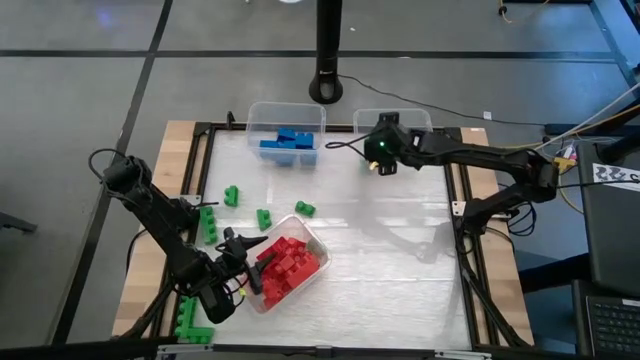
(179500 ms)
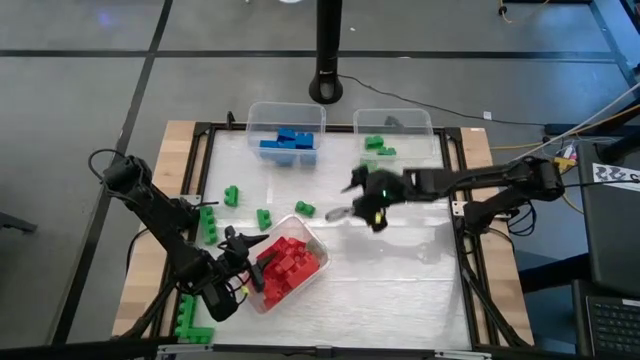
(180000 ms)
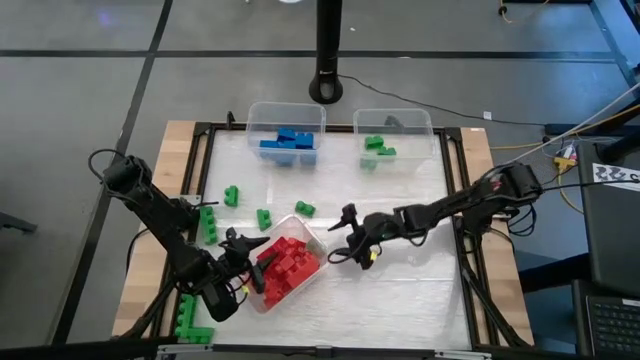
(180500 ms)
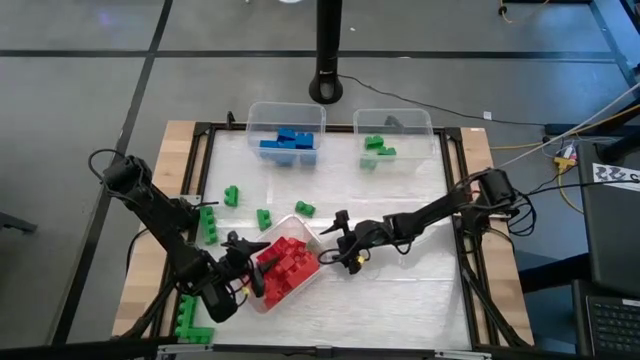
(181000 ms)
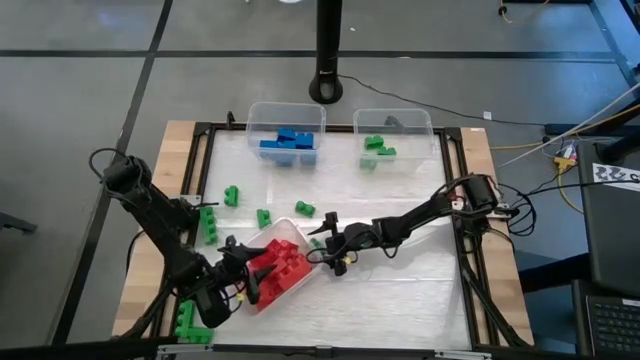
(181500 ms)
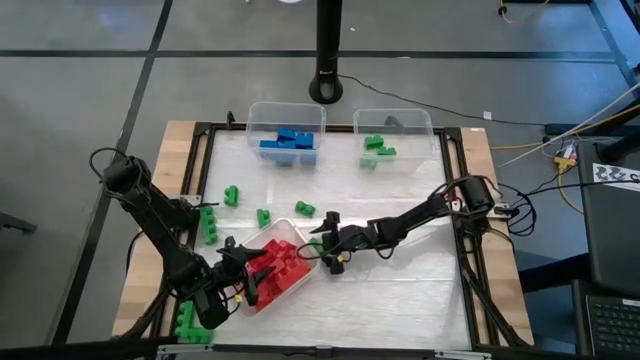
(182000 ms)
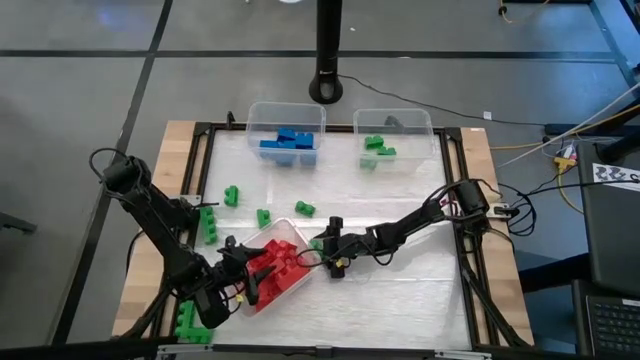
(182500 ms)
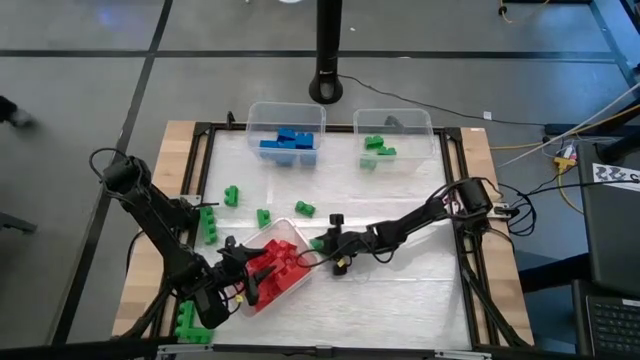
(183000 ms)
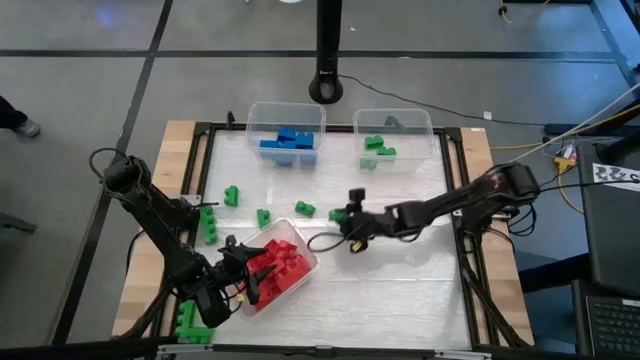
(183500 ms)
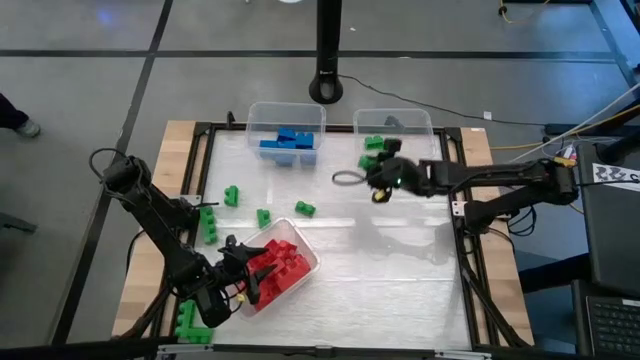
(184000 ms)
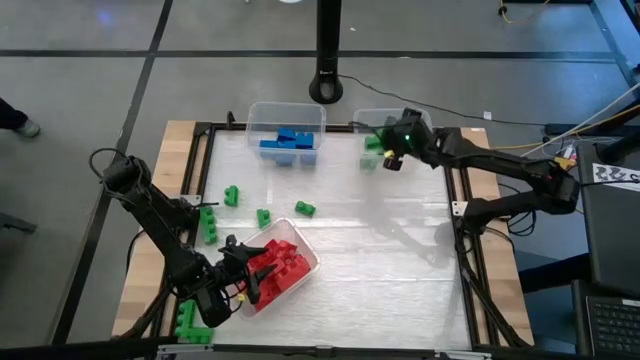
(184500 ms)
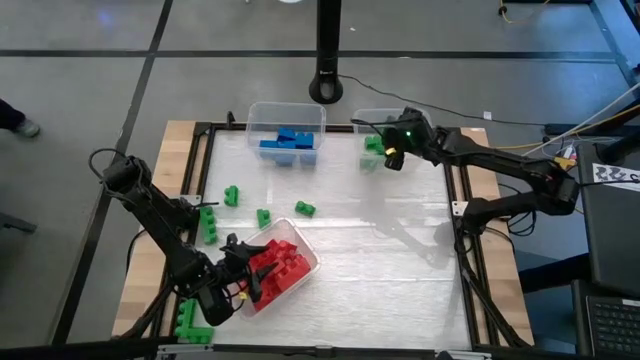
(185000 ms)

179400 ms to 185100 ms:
Task: Sort blocks
Put the green game piece into the top right transparent bin

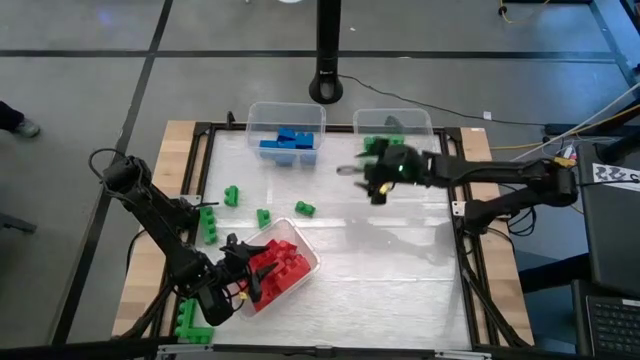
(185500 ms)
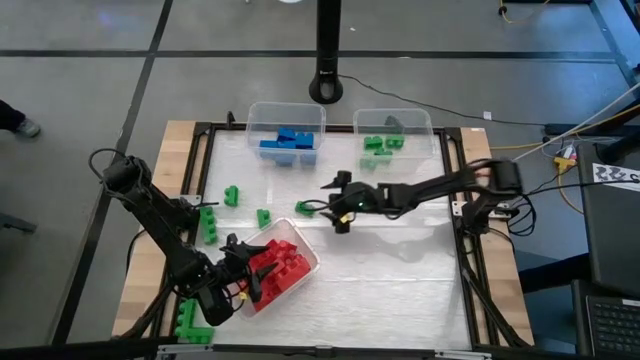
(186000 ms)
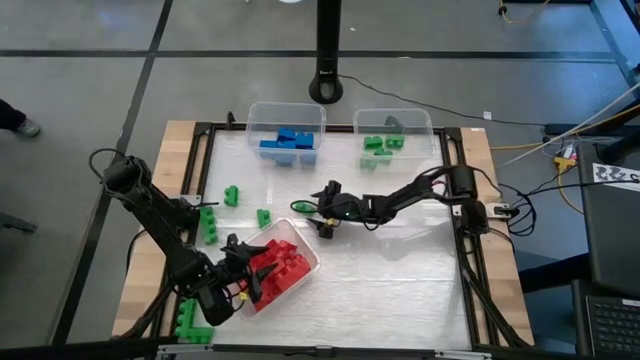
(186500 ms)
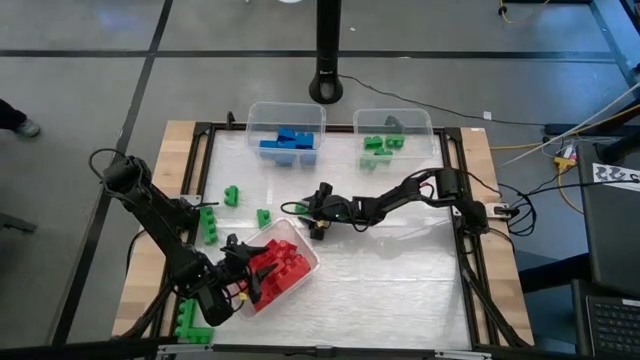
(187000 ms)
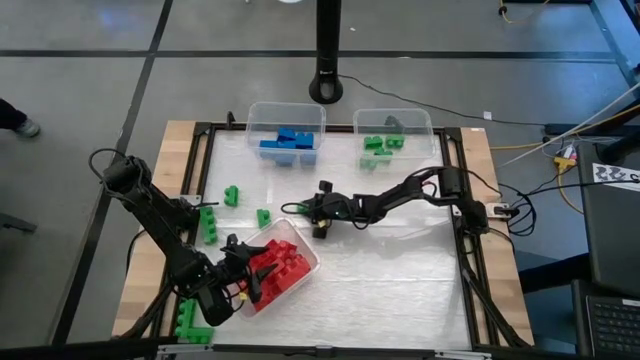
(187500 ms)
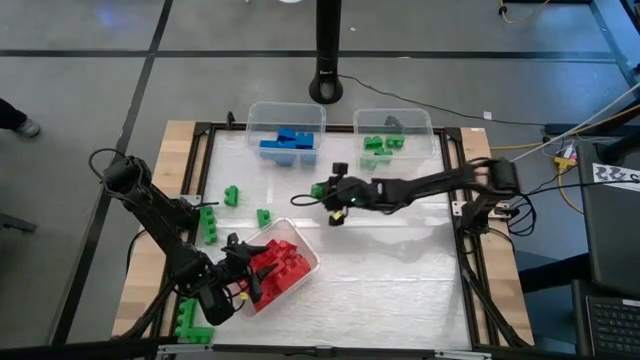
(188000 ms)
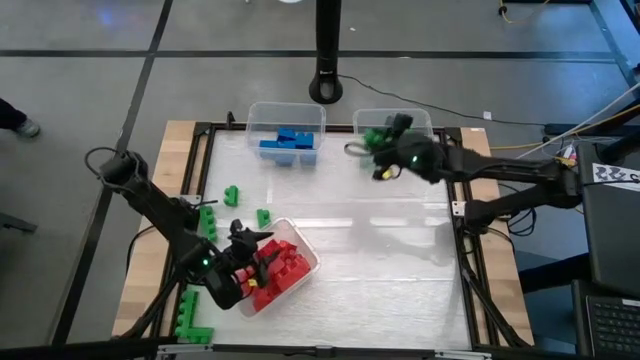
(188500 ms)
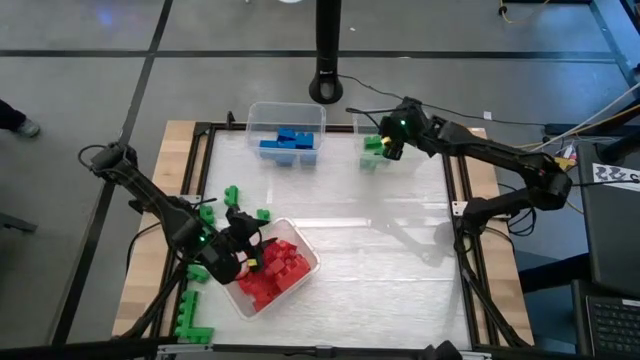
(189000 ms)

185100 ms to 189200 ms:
Put the green game piece into the top right transparent bin

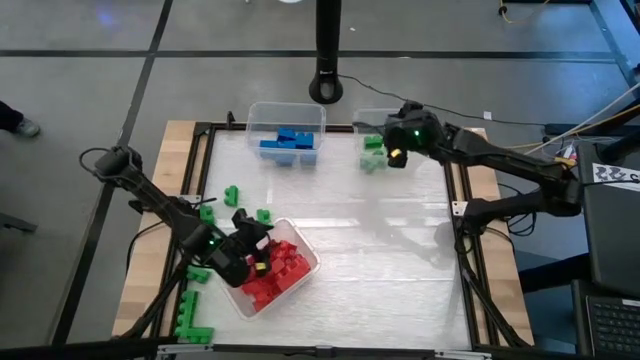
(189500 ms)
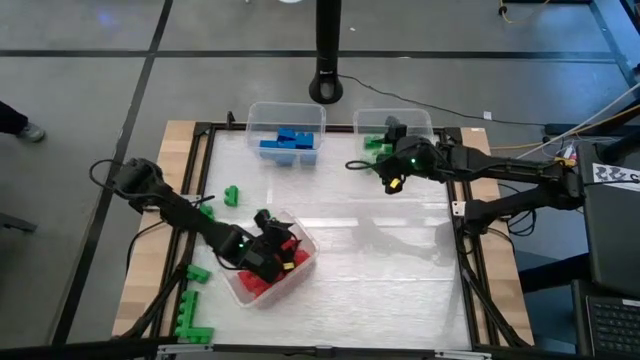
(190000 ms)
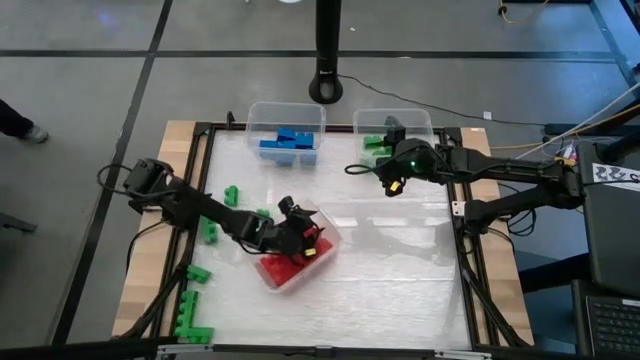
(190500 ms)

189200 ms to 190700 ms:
Adjust the bottom transparent bin

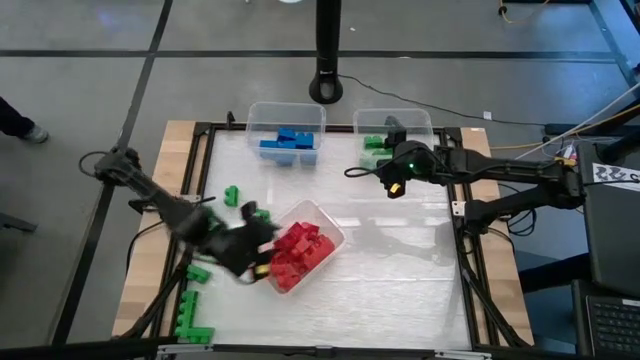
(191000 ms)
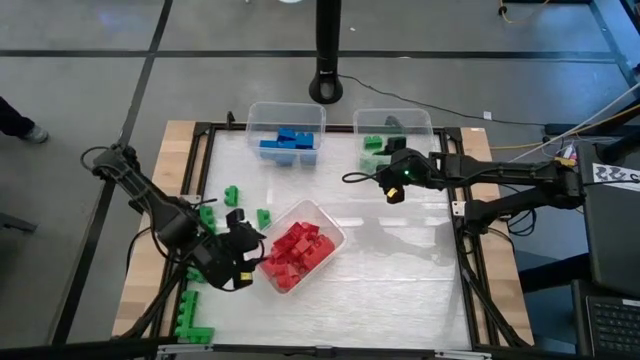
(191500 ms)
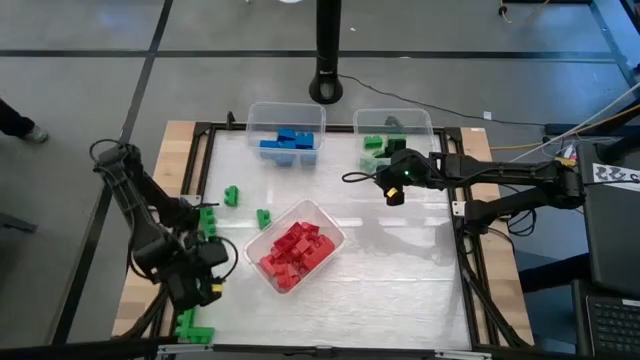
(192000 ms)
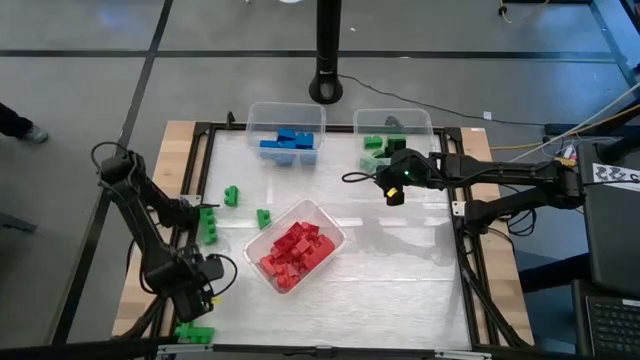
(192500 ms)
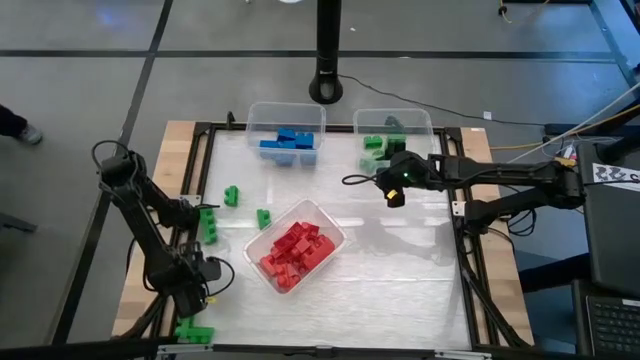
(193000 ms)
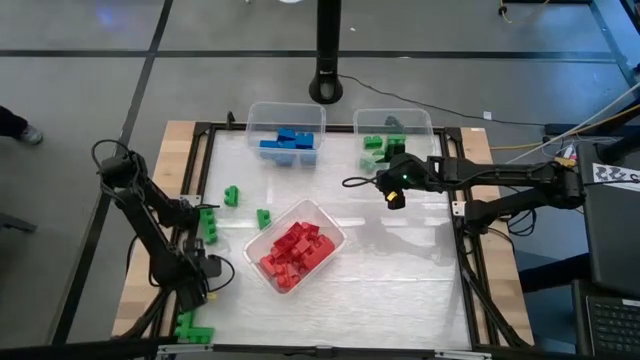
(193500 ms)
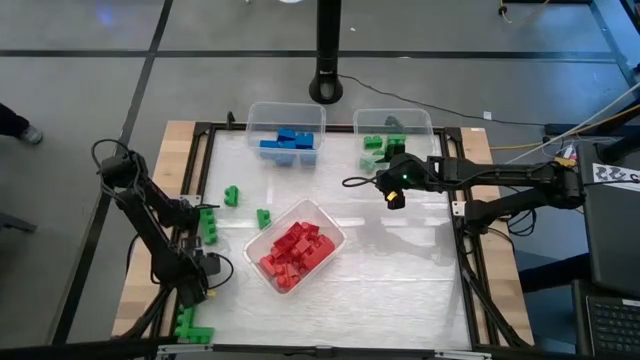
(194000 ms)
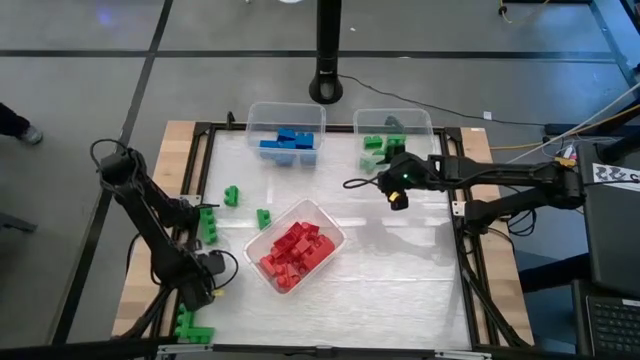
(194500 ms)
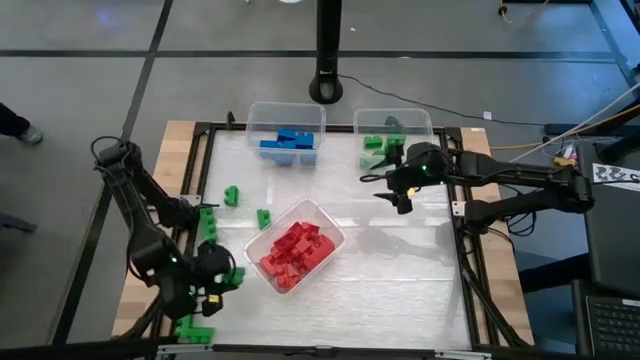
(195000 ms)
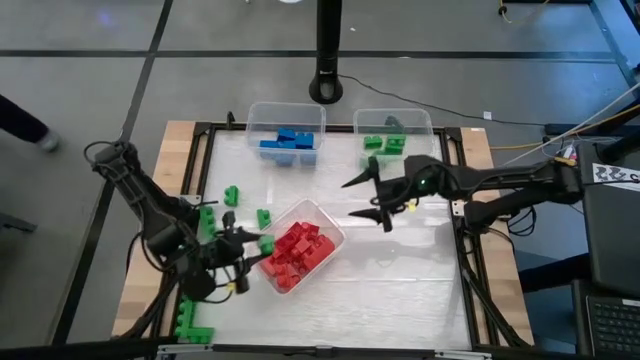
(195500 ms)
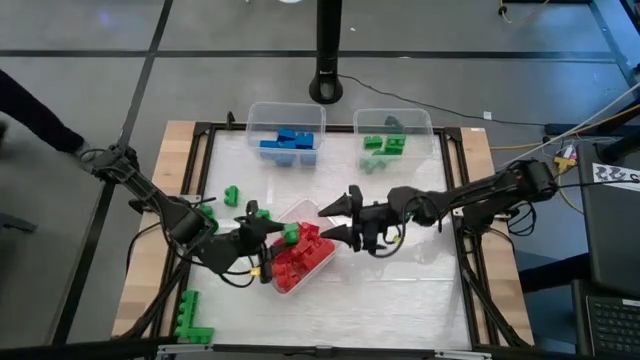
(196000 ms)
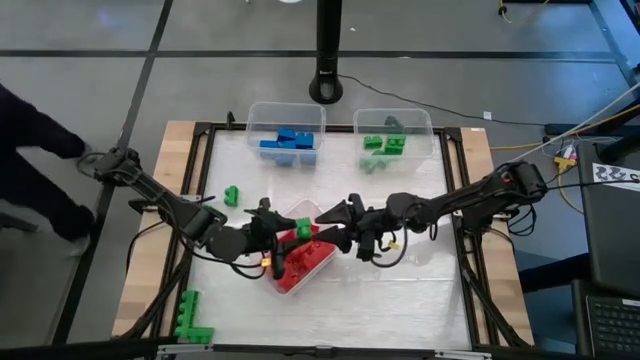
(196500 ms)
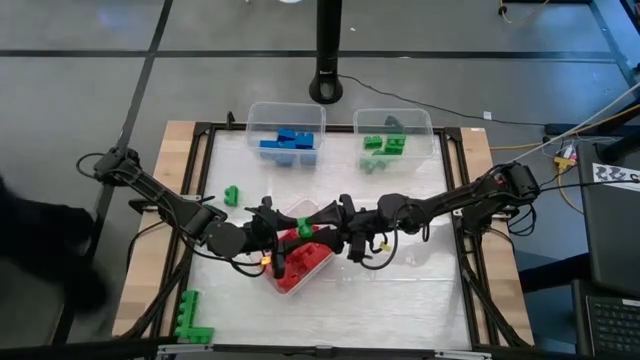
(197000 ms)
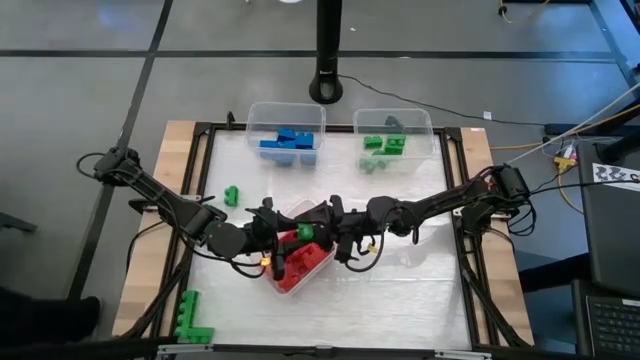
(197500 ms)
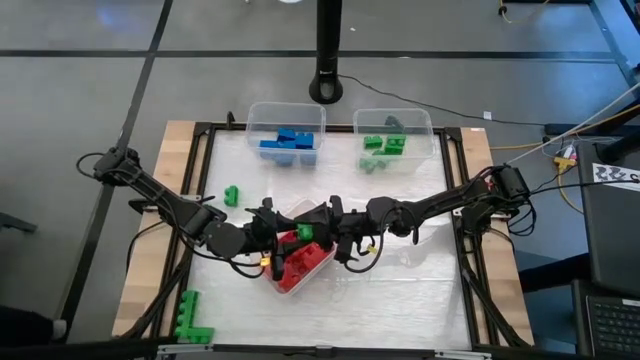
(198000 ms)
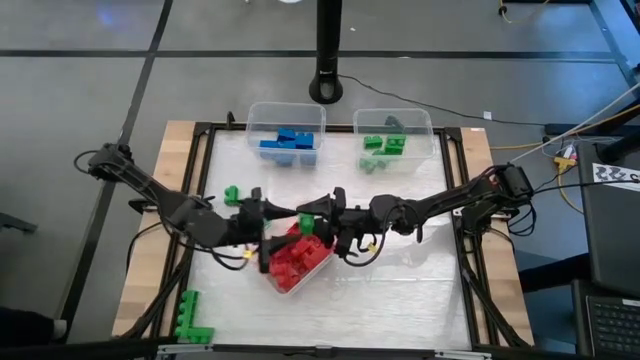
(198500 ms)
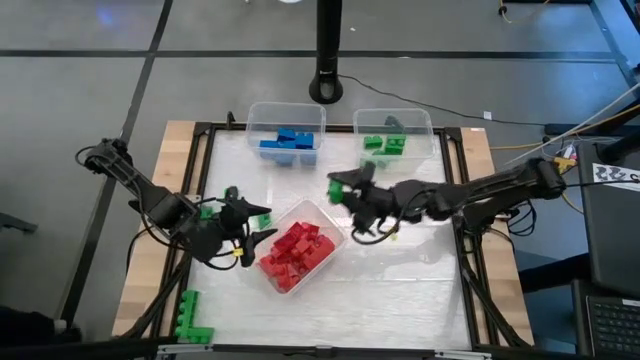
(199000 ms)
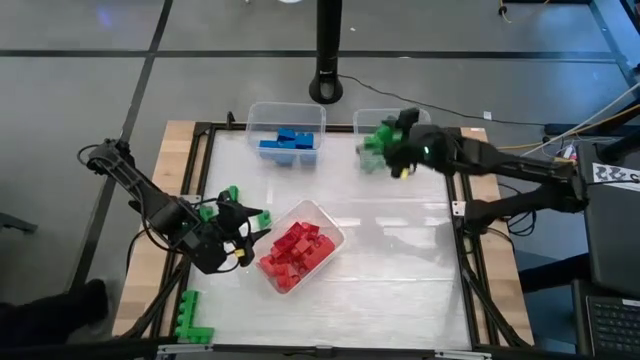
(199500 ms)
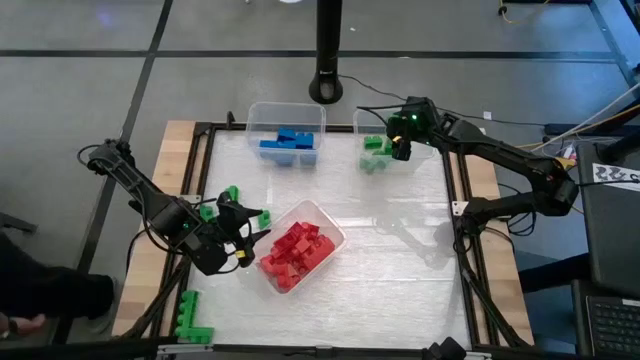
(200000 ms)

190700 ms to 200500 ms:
Put the green game piece into the top right transparent bin
